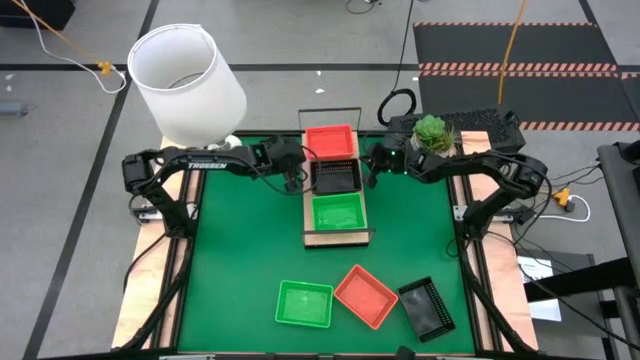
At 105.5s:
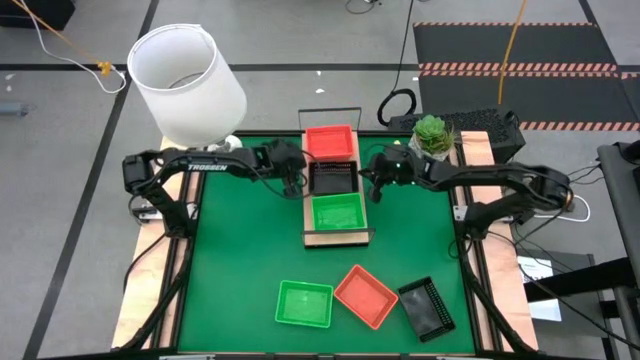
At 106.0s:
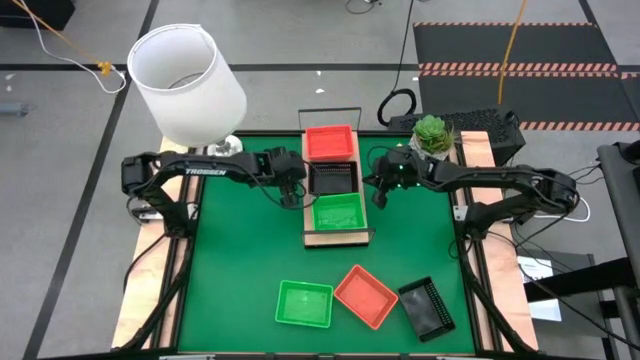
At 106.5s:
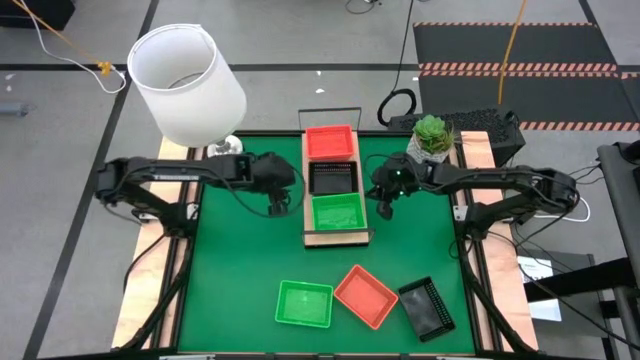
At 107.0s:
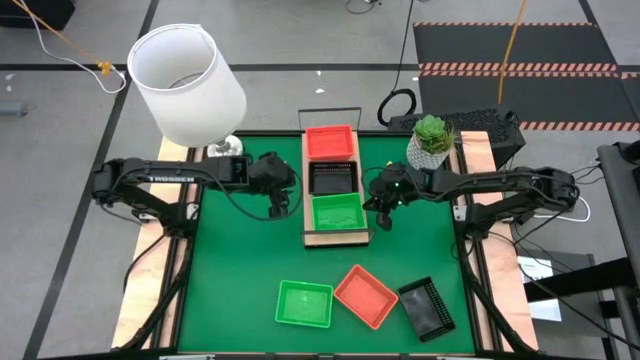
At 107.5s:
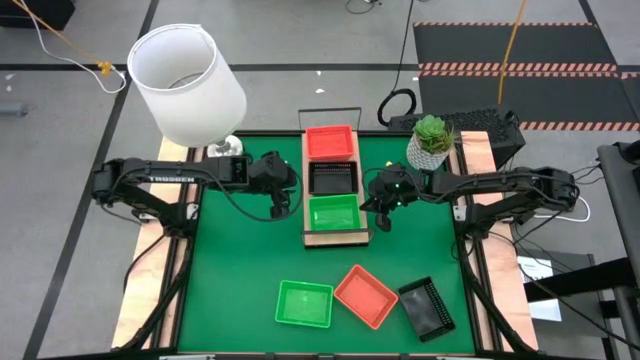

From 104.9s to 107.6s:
Task: Stack baskets on shelf by color
Adjust the bins on the shelf

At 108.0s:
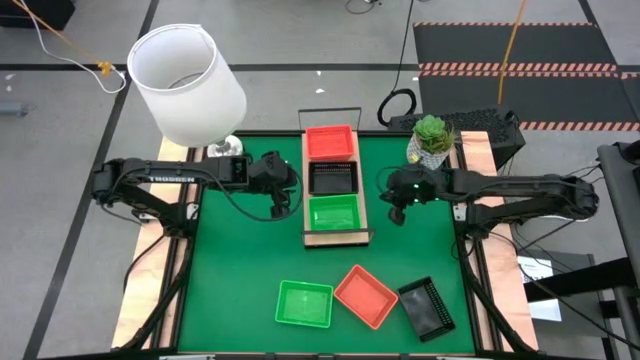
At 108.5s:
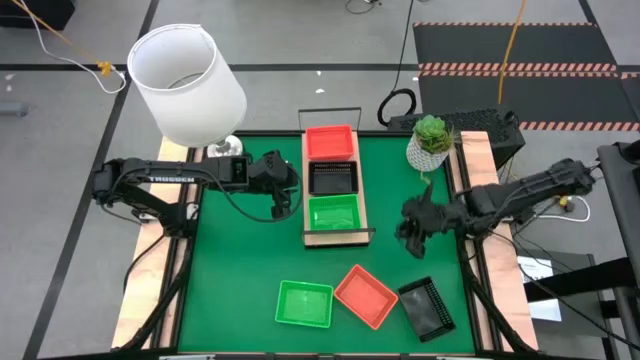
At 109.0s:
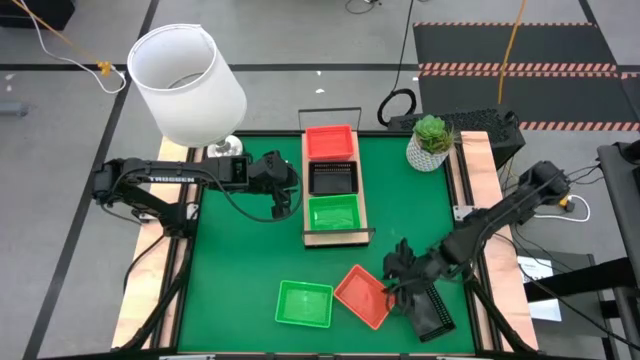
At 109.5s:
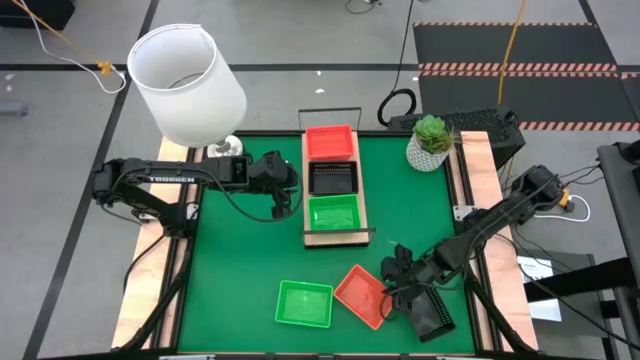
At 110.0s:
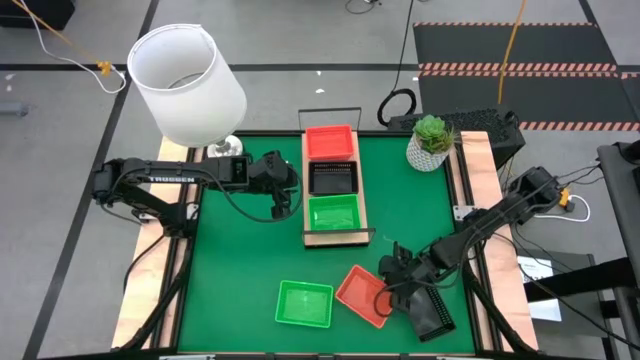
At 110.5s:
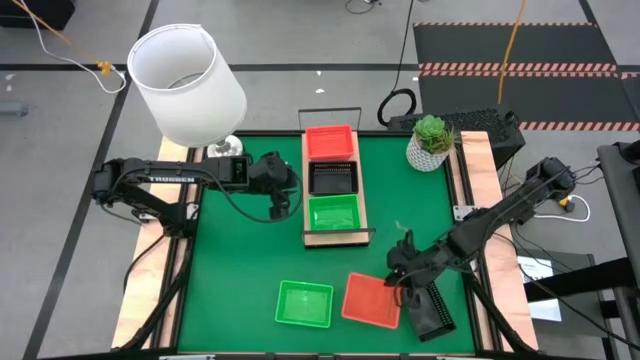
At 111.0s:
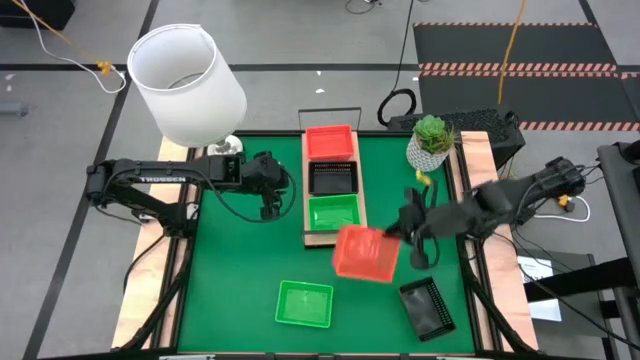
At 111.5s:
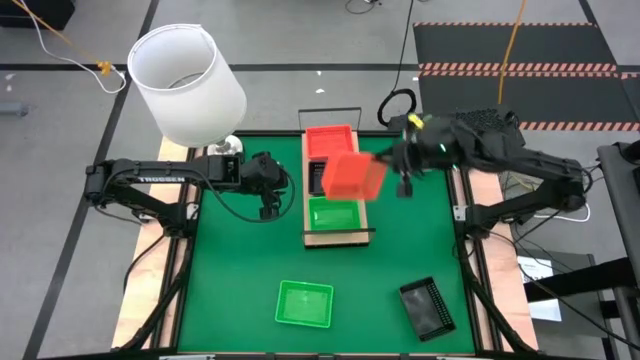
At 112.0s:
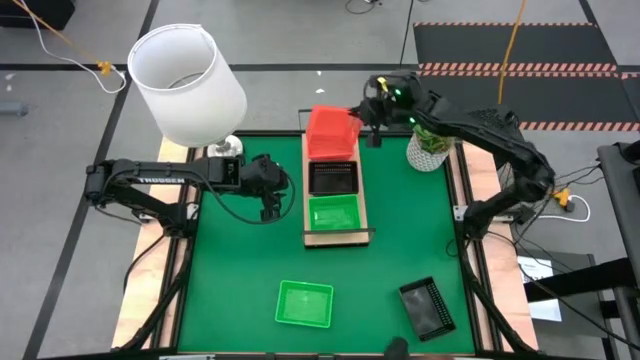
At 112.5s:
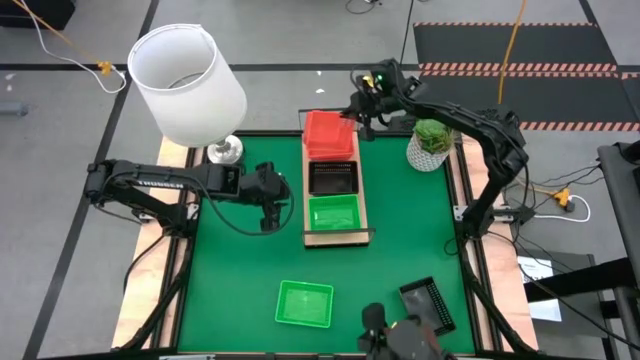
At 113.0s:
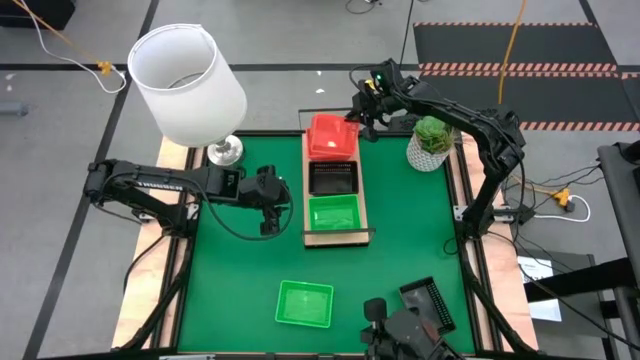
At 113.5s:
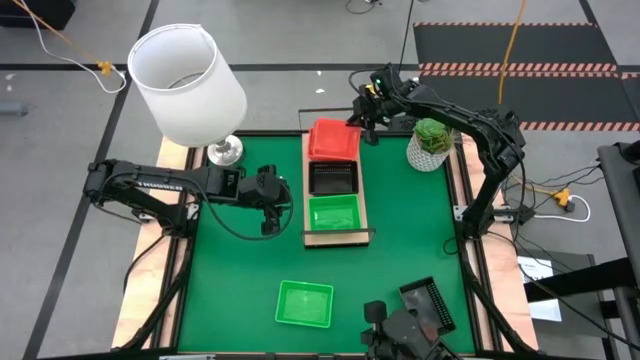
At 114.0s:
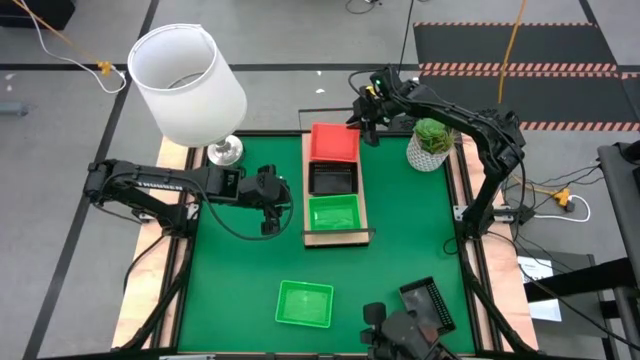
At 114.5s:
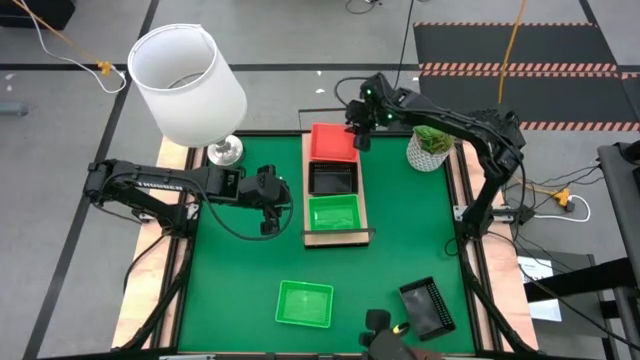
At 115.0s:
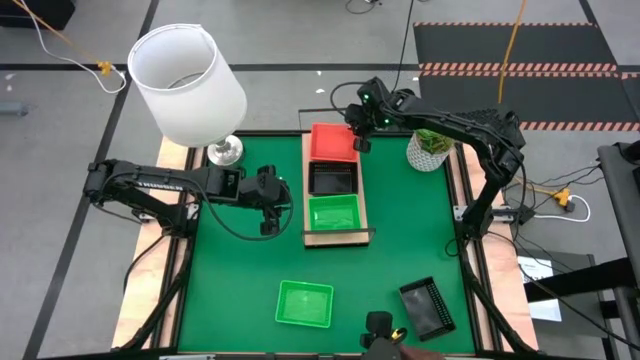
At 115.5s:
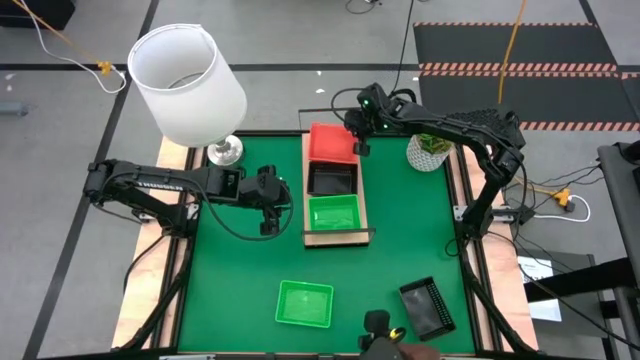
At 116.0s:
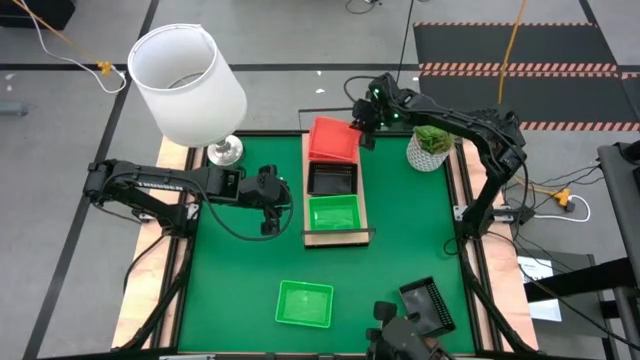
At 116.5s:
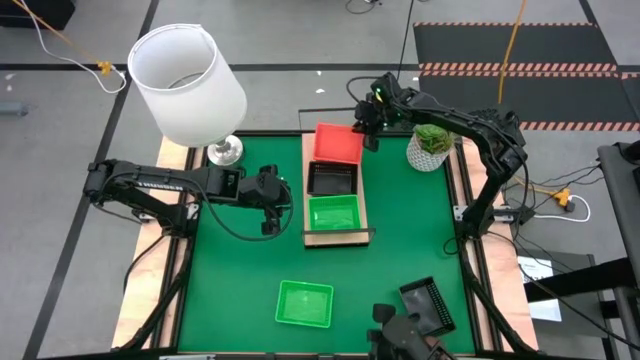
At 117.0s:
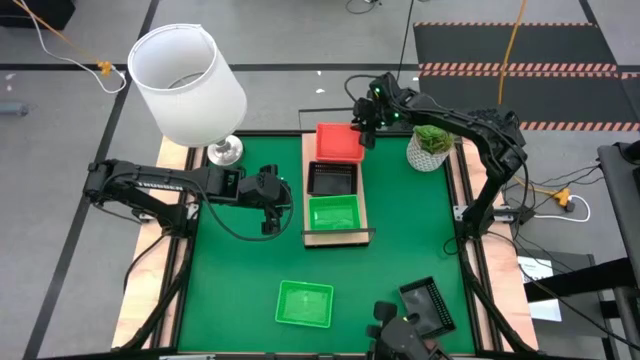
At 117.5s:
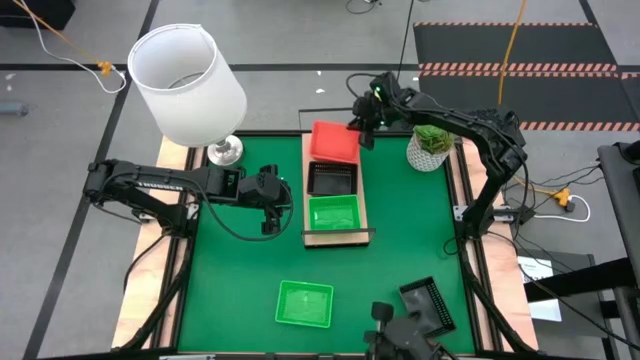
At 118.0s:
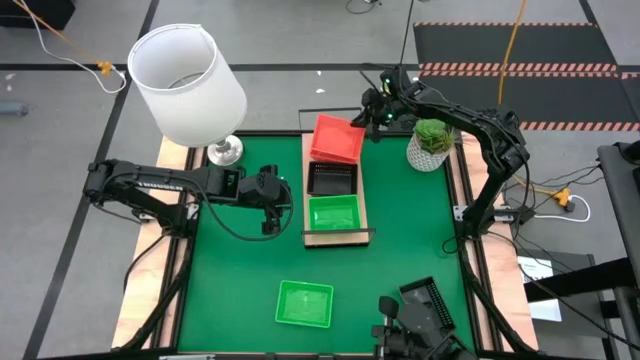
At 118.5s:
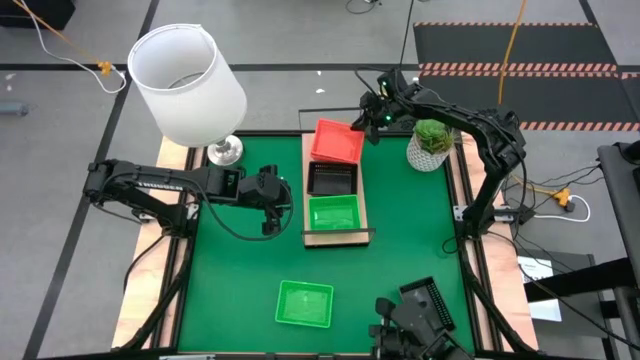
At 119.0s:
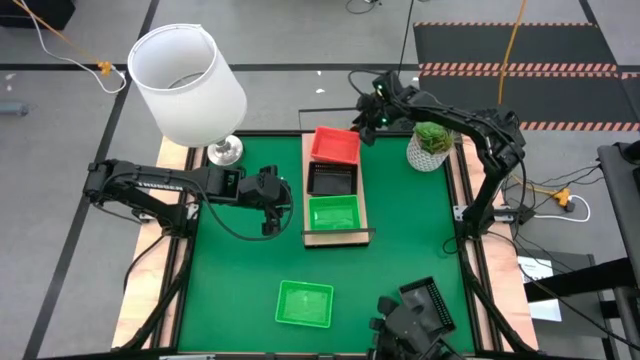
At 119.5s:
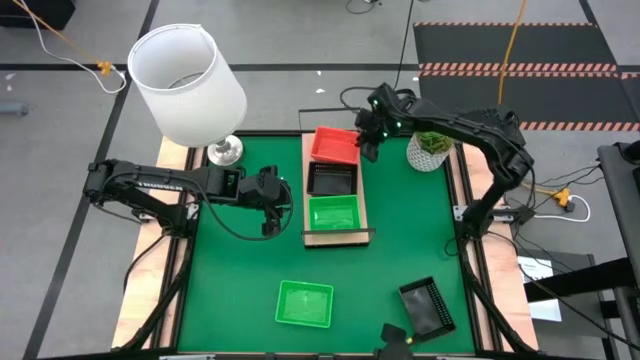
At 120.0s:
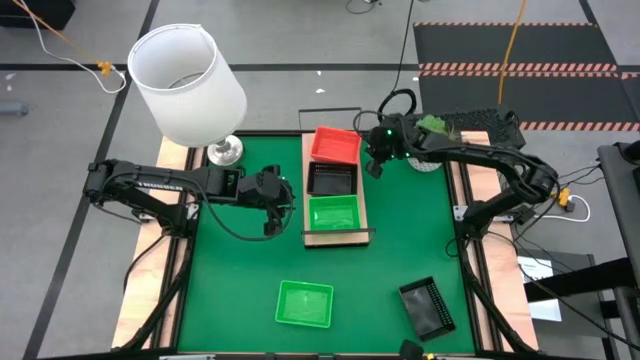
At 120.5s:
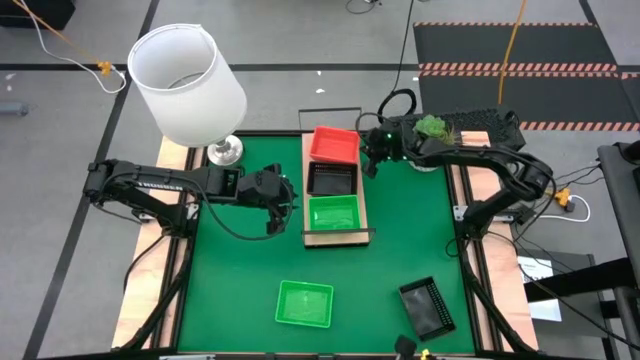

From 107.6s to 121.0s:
Stack the orange bin on the orange bin on the shelf

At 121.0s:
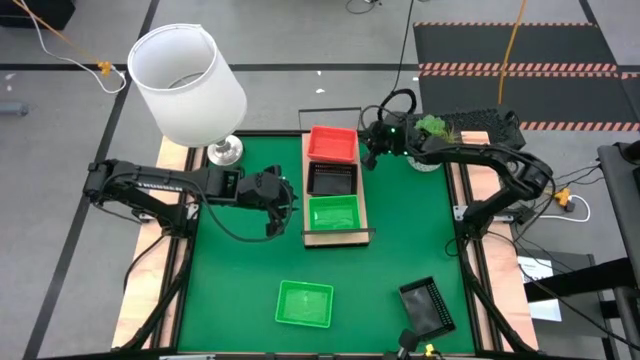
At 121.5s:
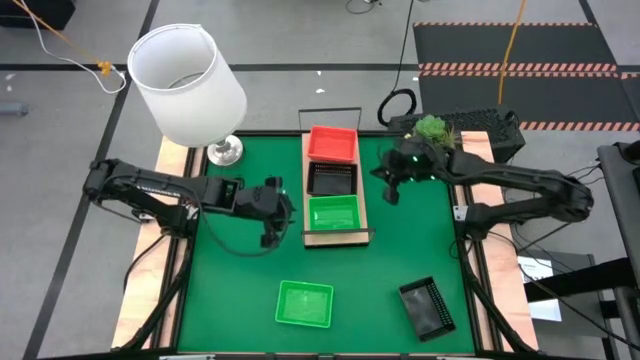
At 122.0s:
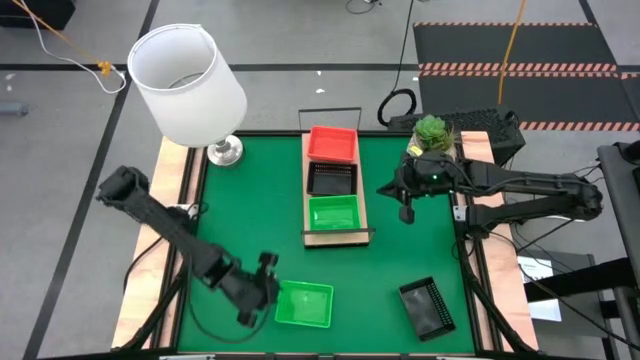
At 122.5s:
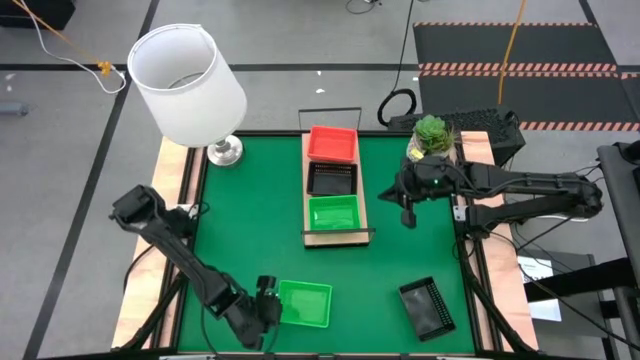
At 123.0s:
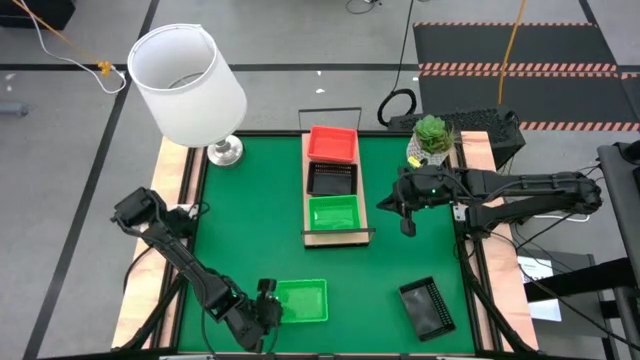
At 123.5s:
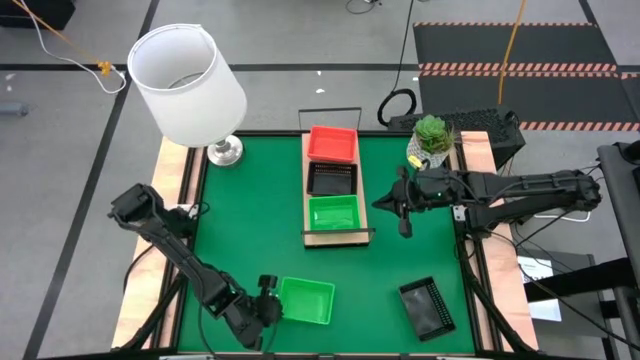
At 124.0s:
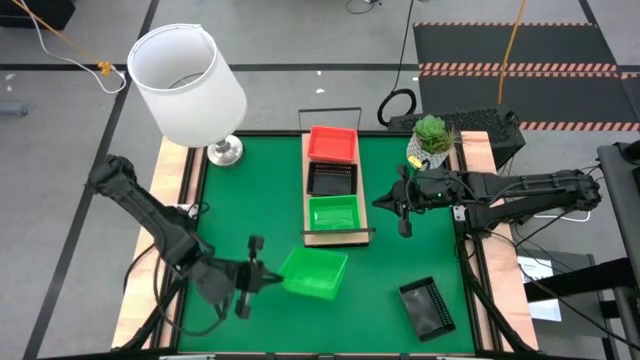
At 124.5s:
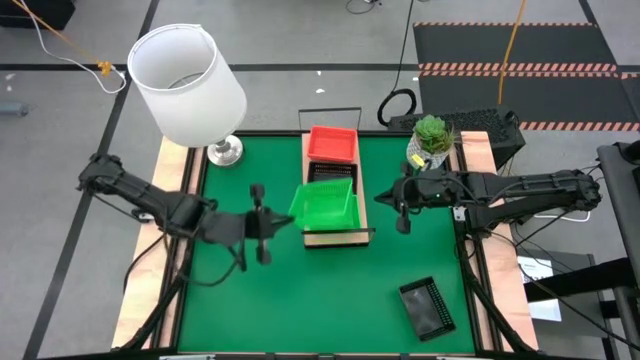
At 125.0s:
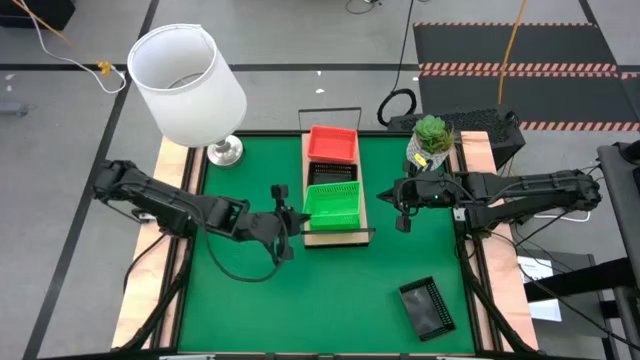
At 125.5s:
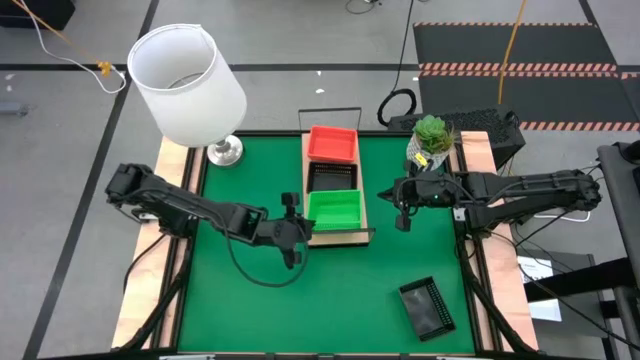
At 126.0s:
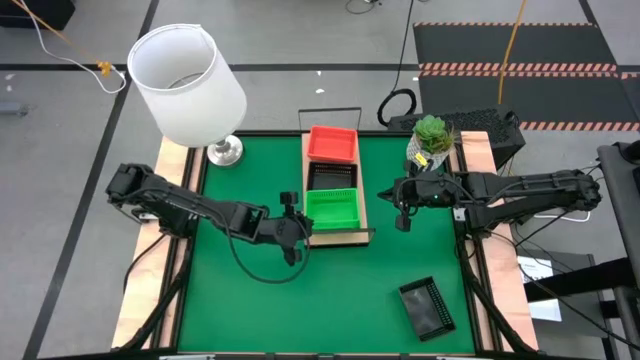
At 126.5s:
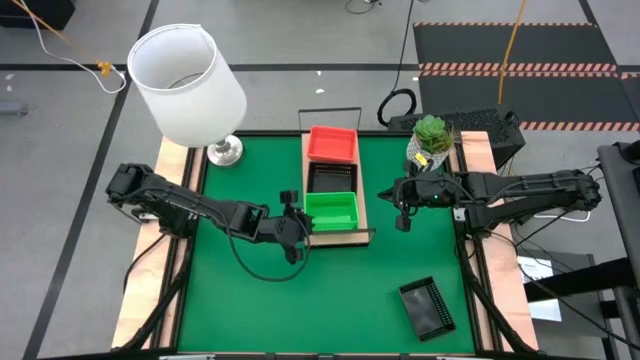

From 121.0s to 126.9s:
Stack the green bin on the green bin on the shelf

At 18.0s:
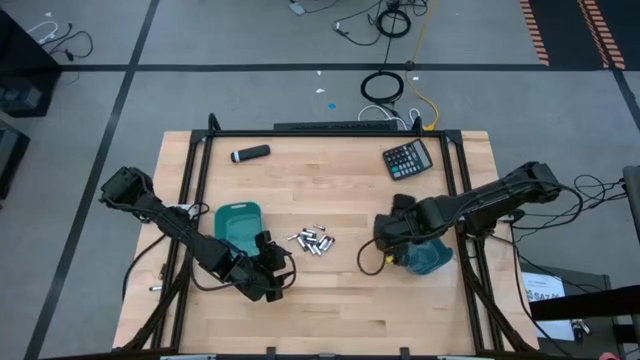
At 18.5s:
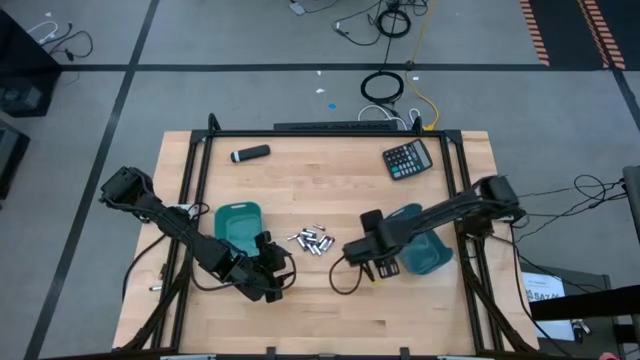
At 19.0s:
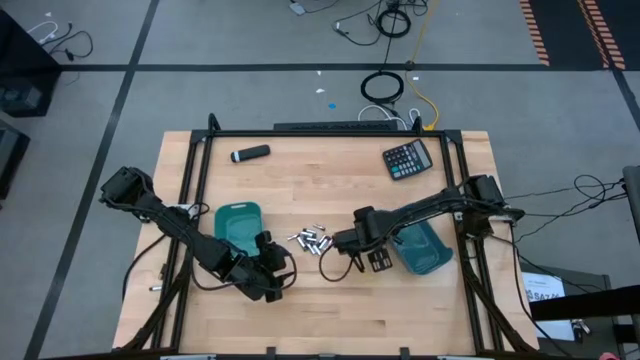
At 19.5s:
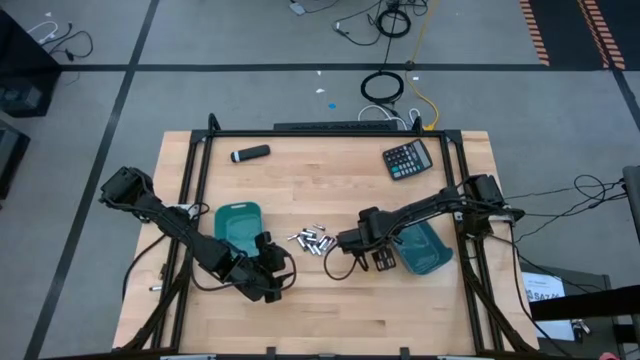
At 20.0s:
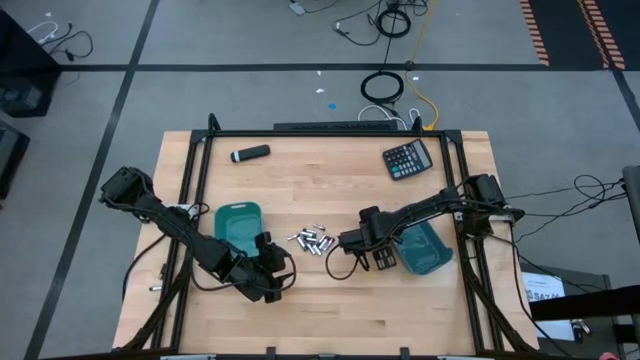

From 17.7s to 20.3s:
Task: Sort batteries
Put the black battery into the blue bin
